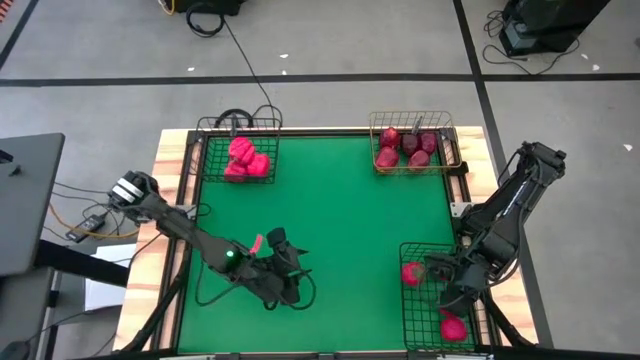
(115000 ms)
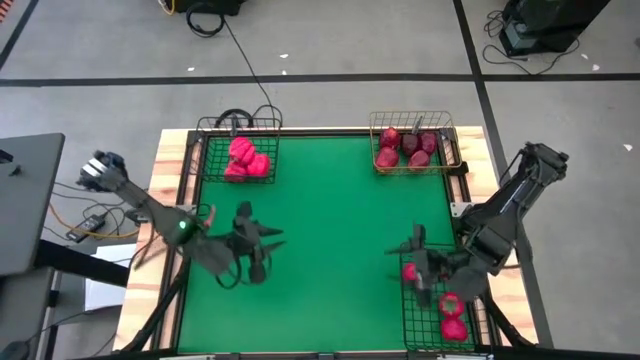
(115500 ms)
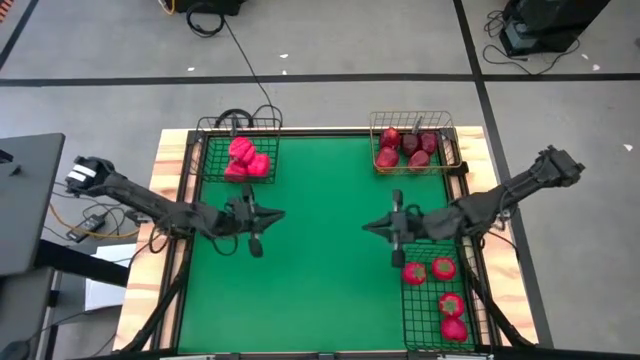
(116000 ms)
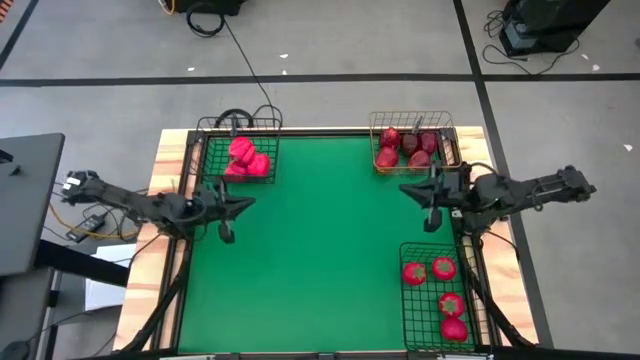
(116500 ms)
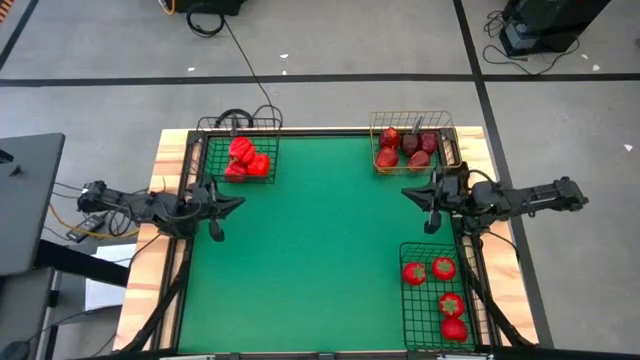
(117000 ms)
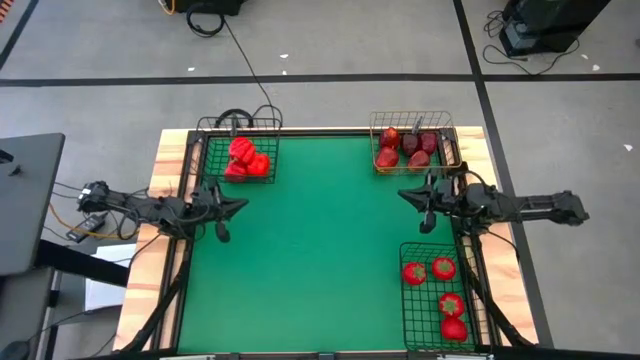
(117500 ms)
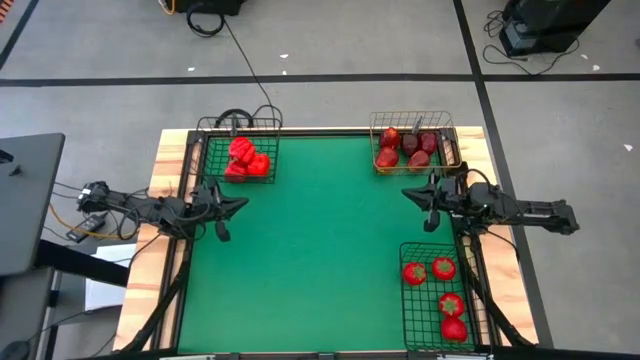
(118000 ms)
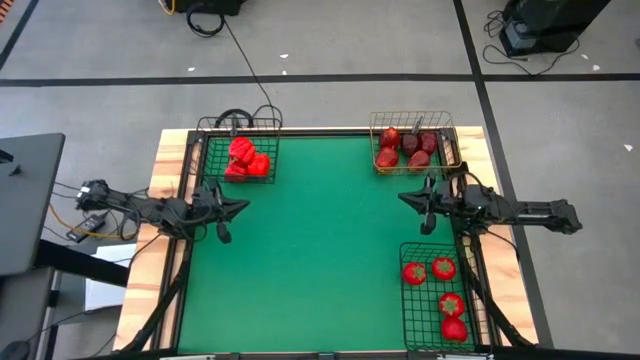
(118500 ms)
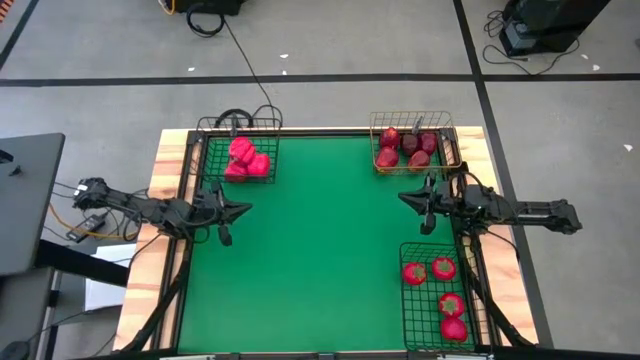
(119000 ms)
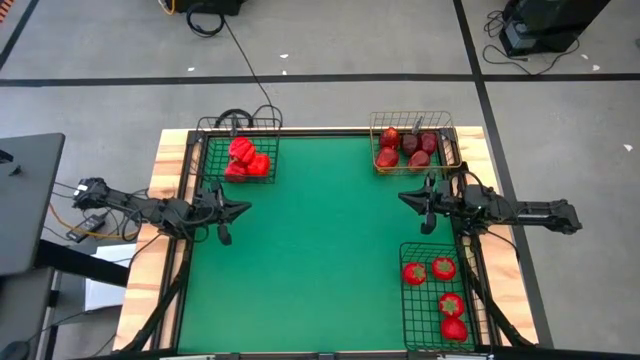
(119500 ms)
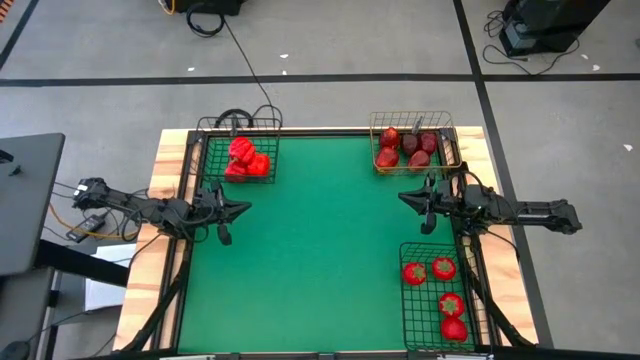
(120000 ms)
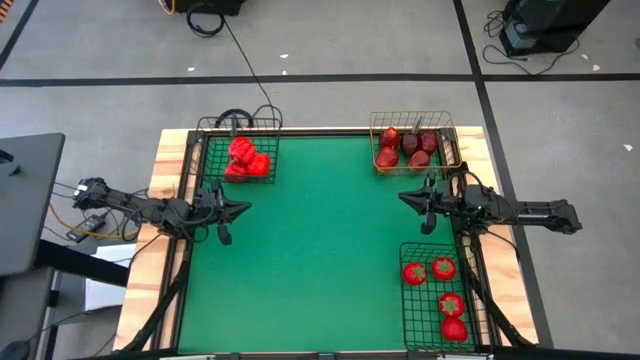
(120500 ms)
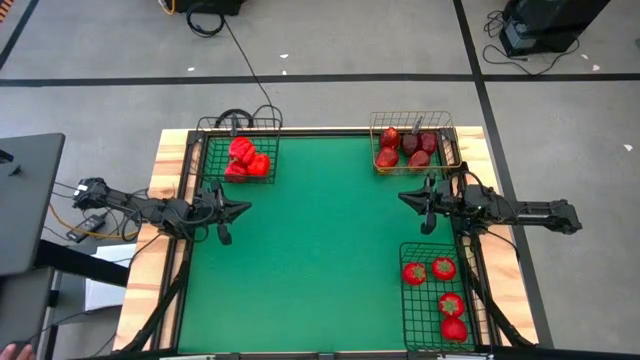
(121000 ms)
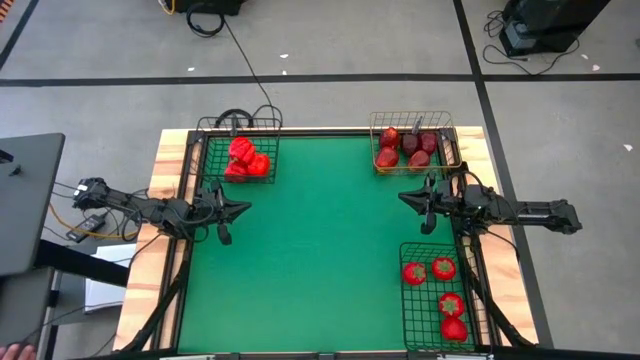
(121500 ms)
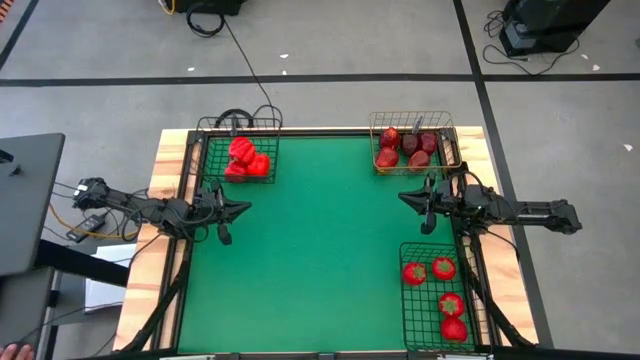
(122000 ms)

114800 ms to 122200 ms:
Task: Sort produce into baskets
Return to Home Position

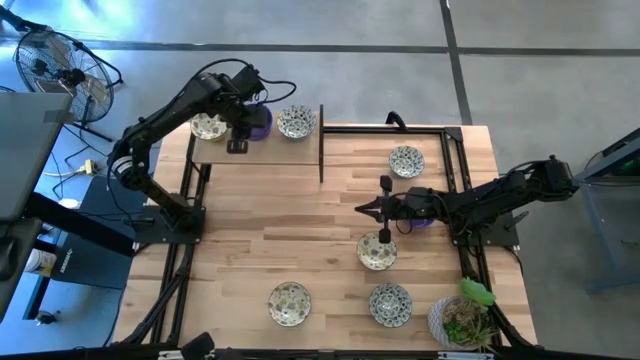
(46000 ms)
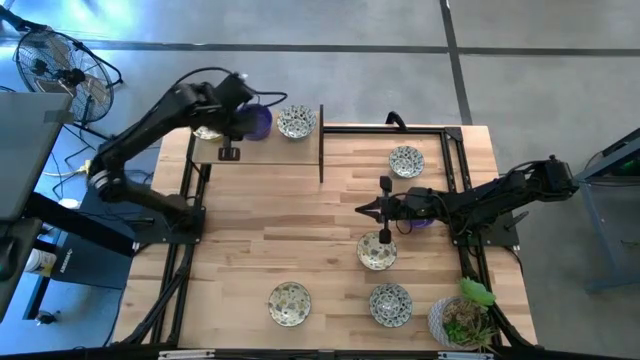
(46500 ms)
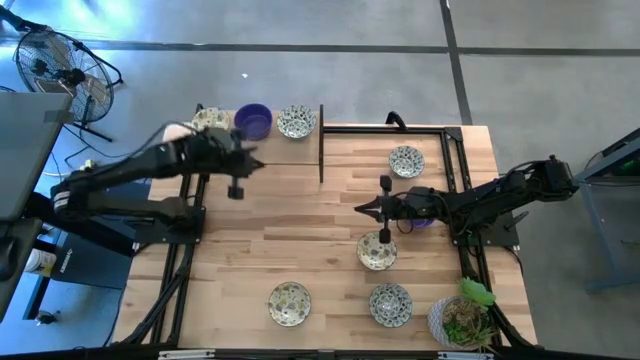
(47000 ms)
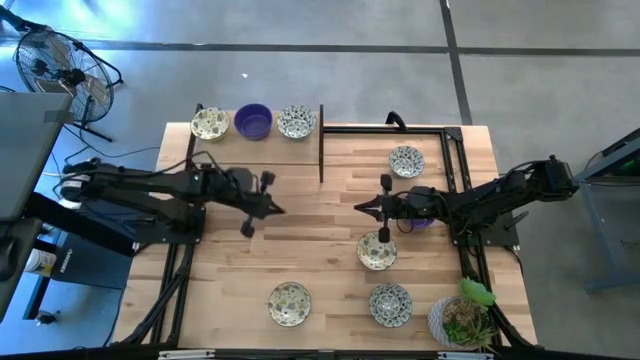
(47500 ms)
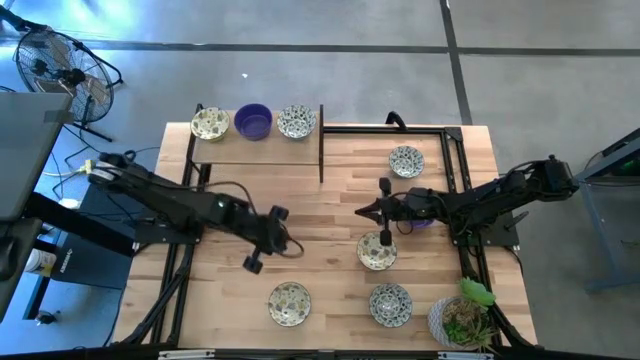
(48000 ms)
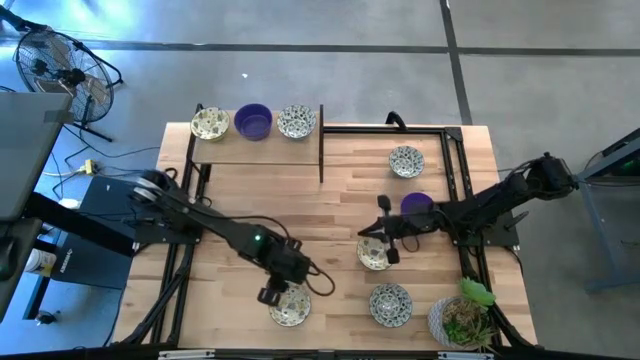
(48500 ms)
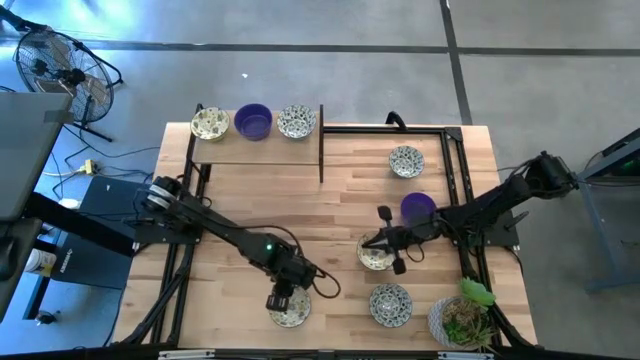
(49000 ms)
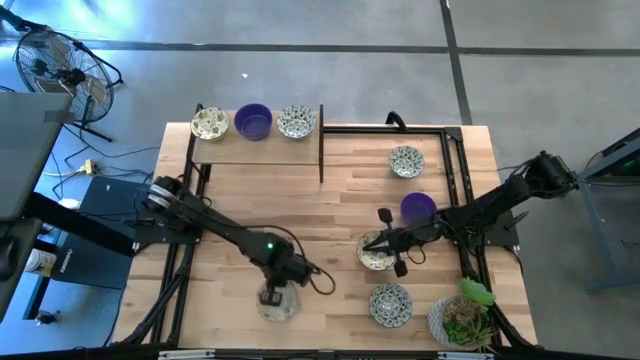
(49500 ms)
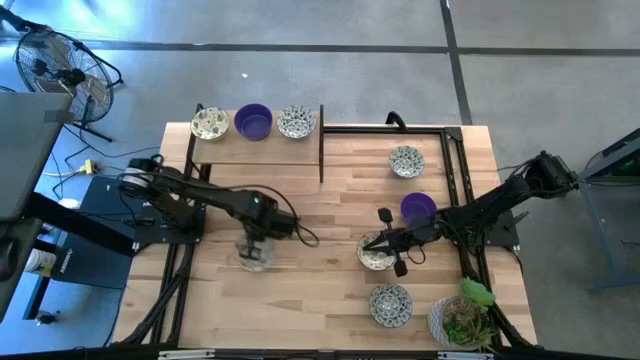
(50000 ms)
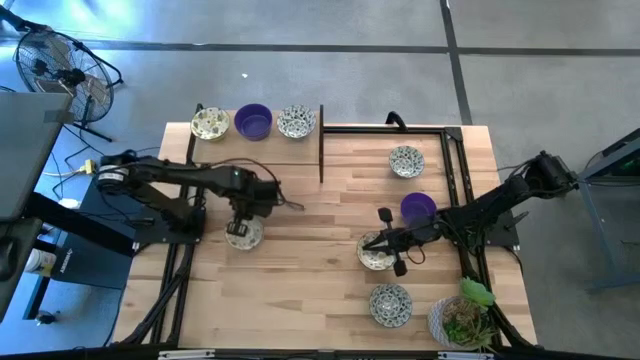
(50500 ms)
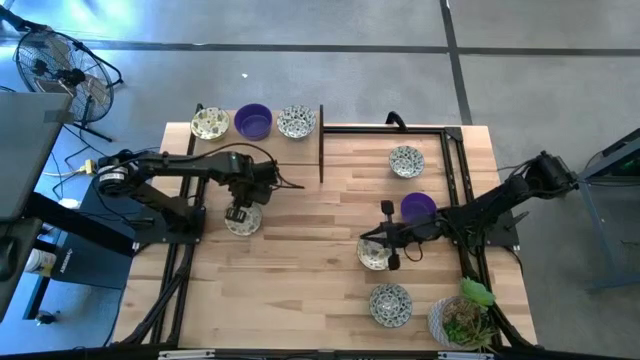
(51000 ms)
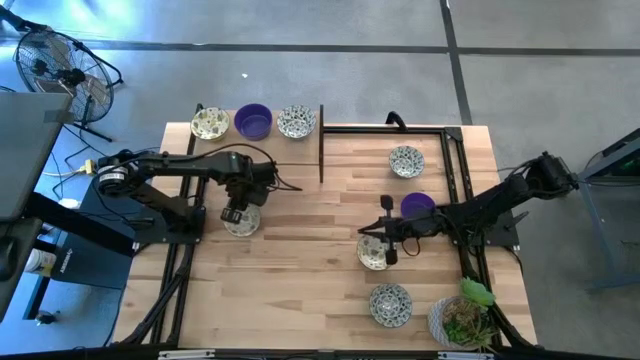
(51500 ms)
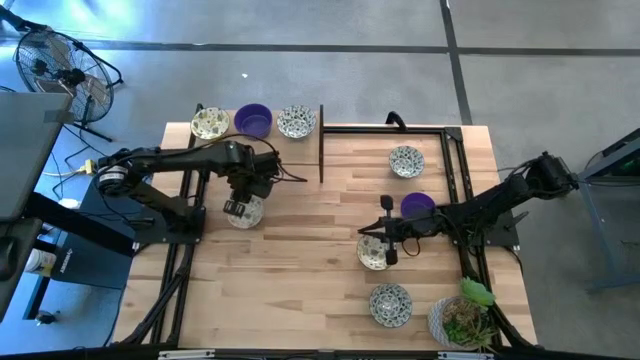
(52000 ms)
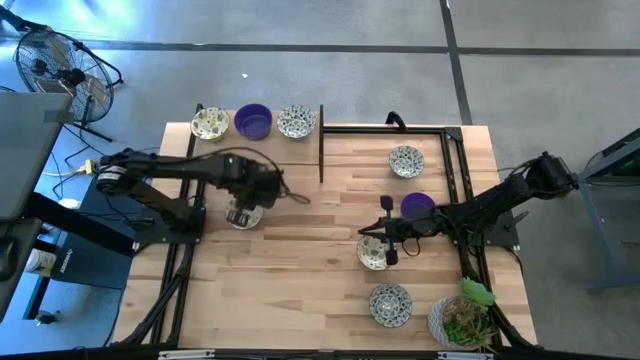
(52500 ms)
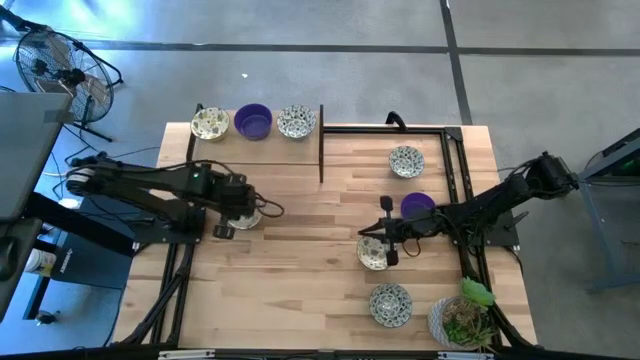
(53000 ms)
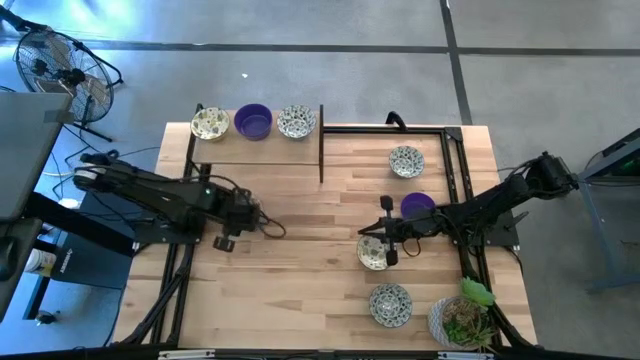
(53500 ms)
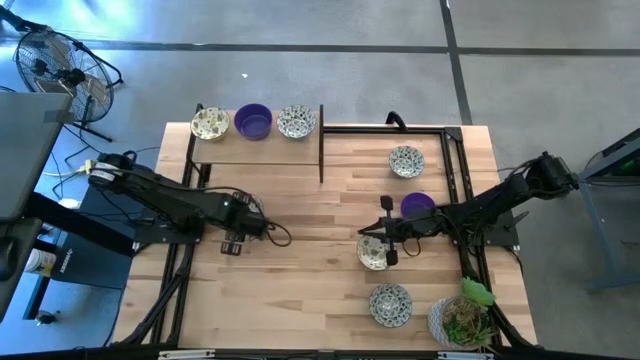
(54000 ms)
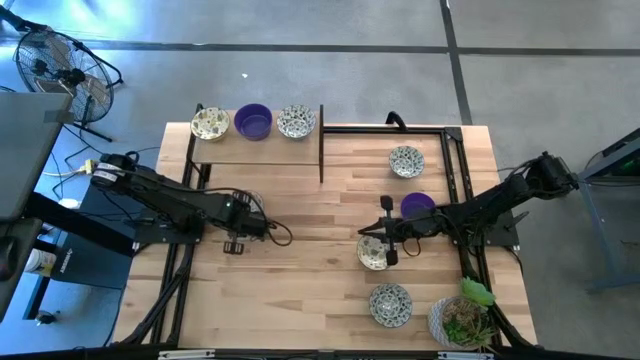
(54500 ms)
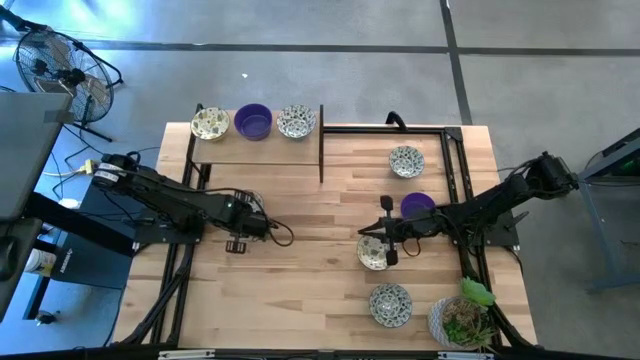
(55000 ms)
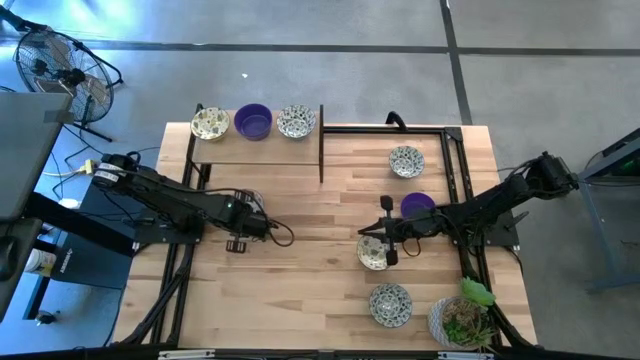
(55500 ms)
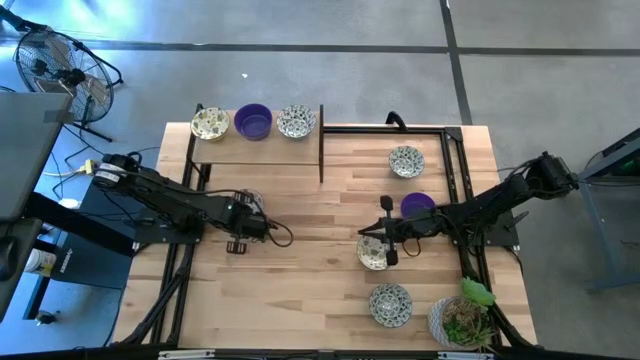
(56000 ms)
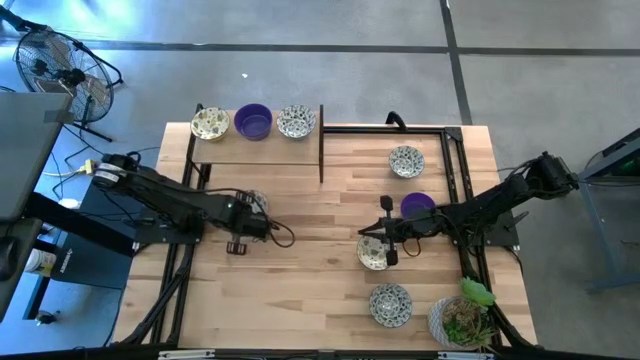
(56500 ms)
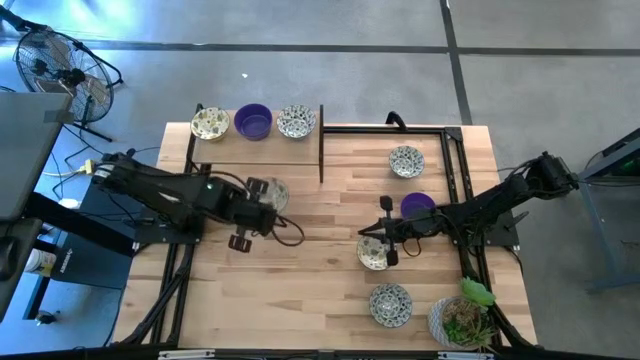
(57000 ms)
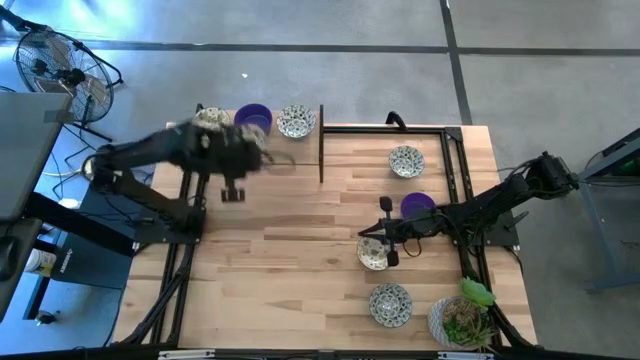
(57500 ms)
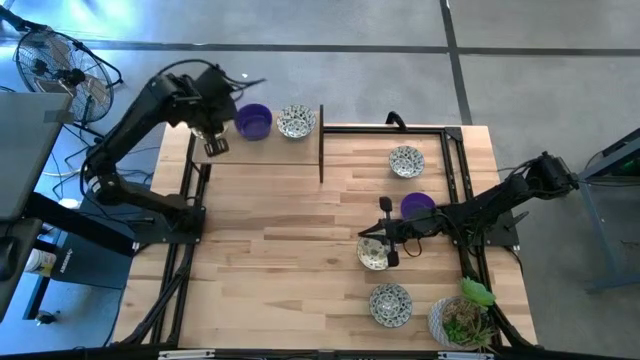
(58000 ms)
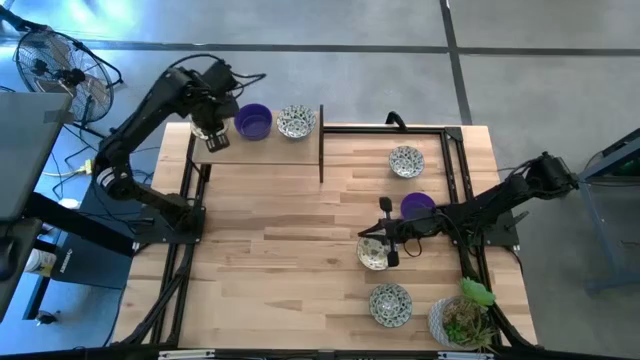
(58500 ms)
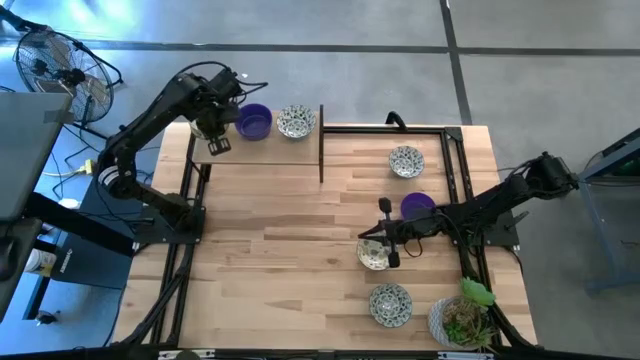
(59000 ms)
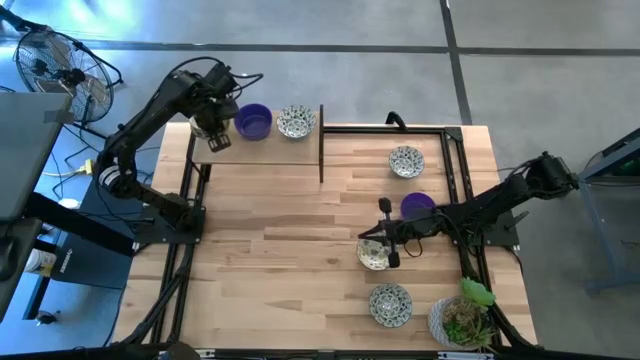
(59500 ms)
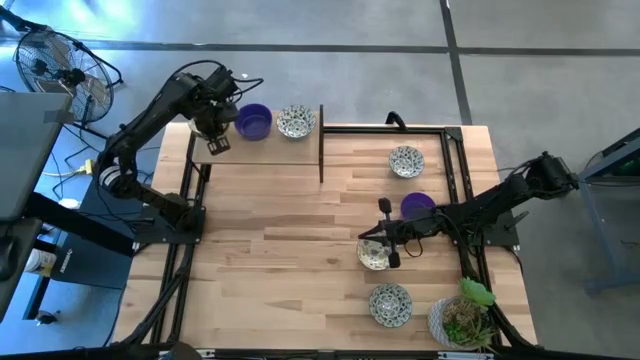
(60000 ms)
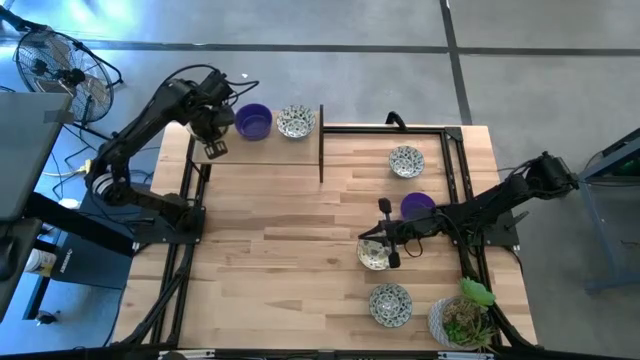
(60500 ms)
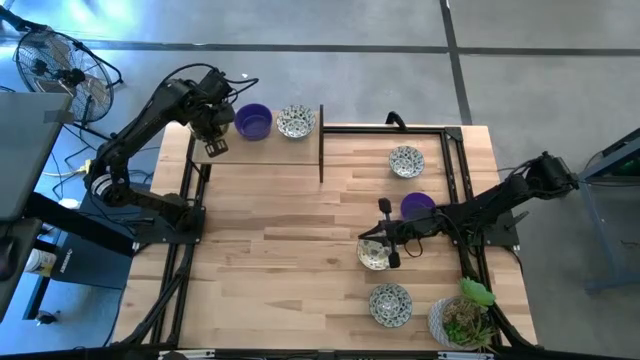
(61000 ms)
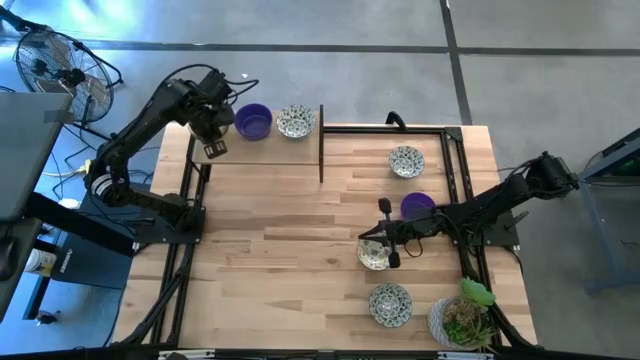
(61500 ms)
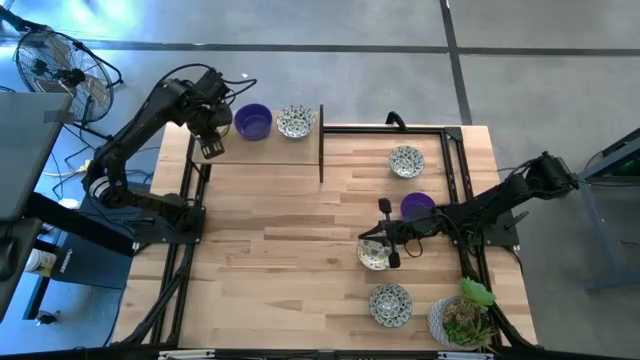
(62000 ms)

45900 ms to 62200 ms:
Task: Pick & Place Mini bowls
Stack the bottom yellow and white patterned bowl on the yellow and white patterned bowl on the shelf
